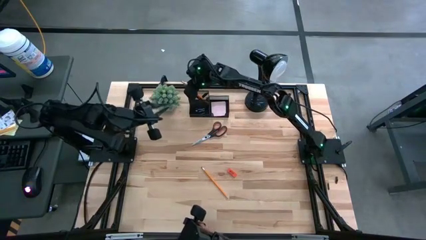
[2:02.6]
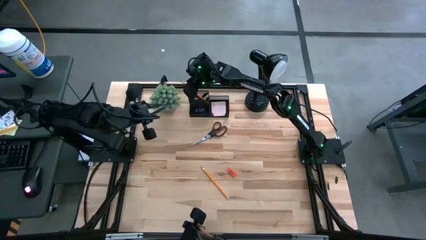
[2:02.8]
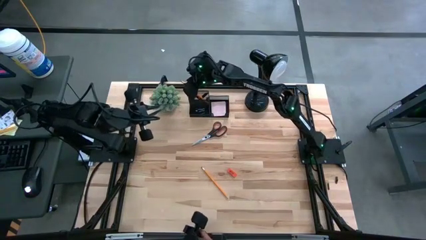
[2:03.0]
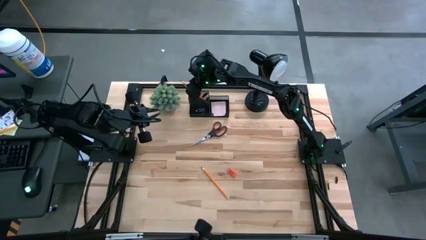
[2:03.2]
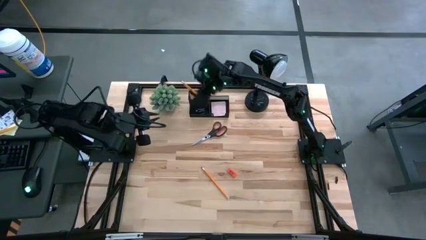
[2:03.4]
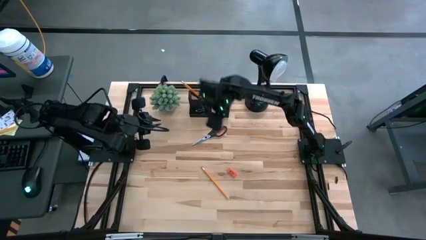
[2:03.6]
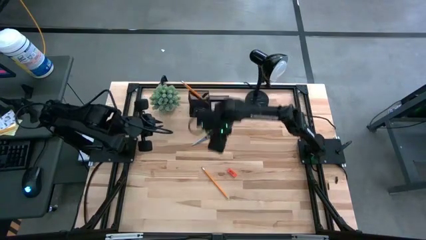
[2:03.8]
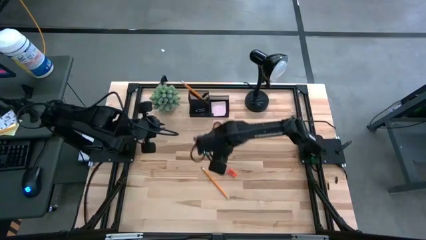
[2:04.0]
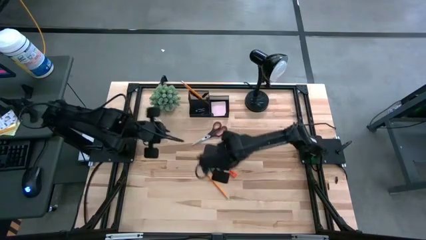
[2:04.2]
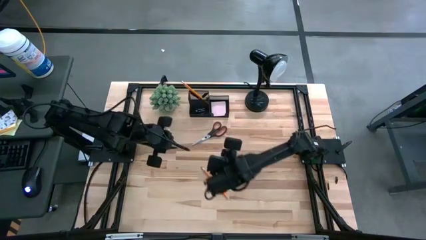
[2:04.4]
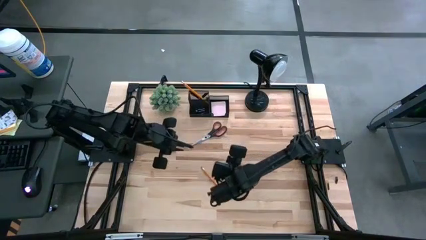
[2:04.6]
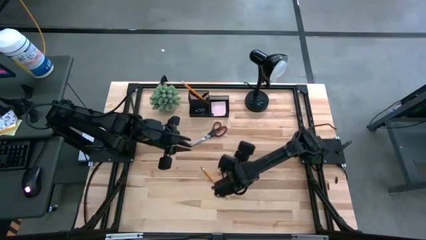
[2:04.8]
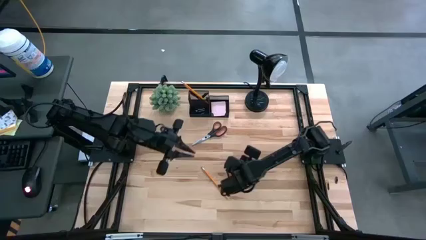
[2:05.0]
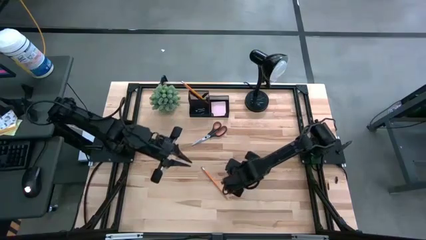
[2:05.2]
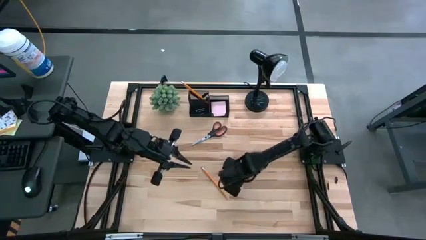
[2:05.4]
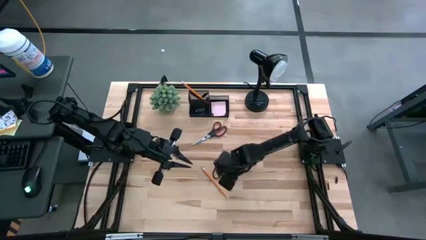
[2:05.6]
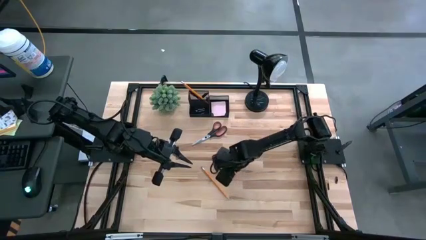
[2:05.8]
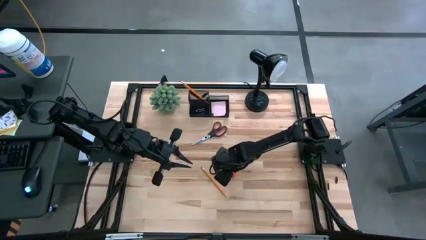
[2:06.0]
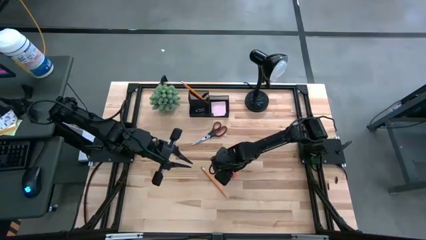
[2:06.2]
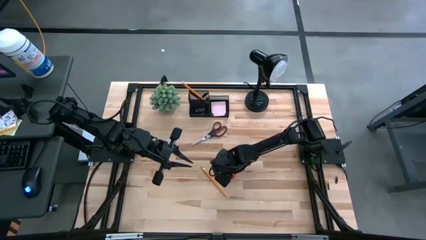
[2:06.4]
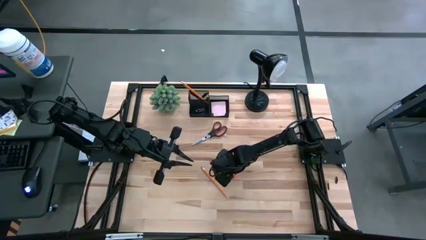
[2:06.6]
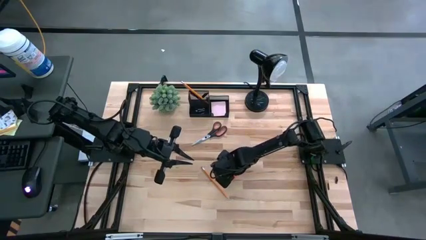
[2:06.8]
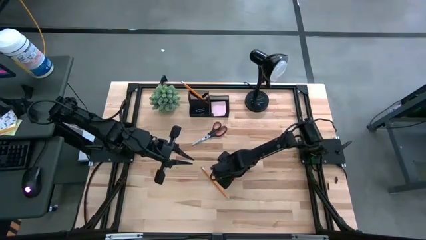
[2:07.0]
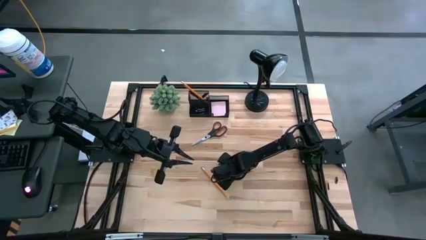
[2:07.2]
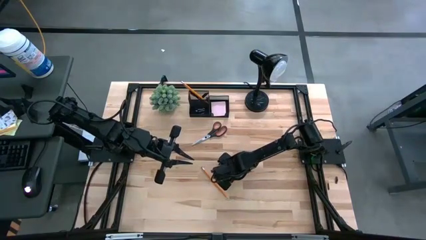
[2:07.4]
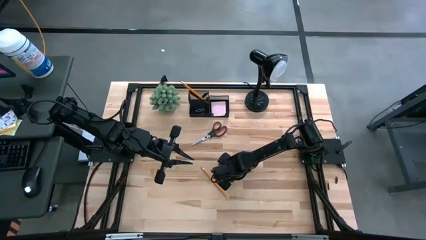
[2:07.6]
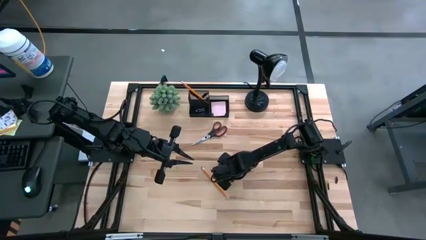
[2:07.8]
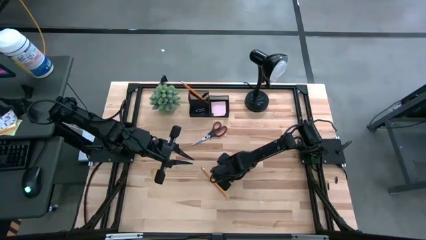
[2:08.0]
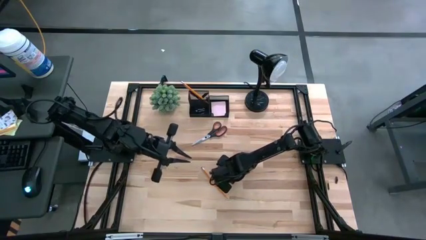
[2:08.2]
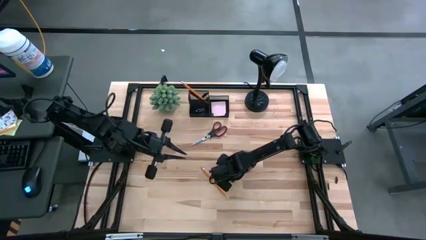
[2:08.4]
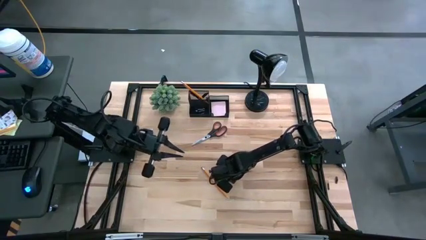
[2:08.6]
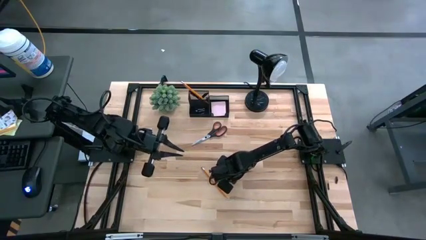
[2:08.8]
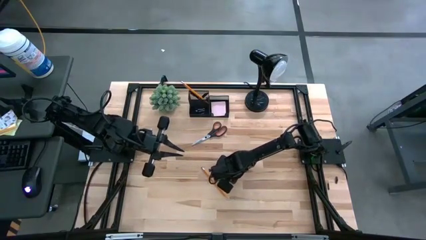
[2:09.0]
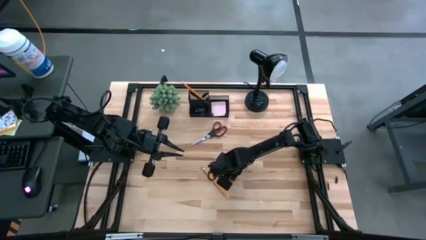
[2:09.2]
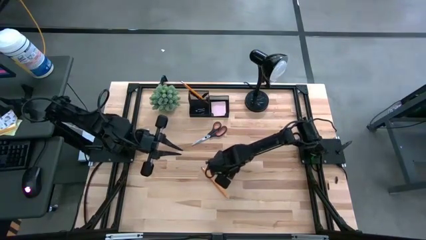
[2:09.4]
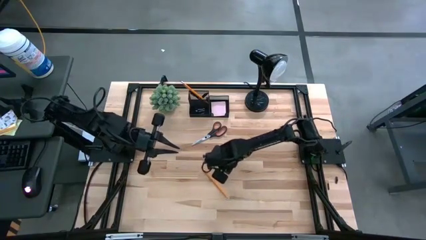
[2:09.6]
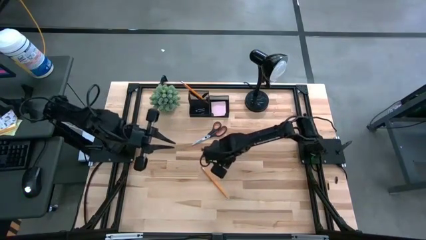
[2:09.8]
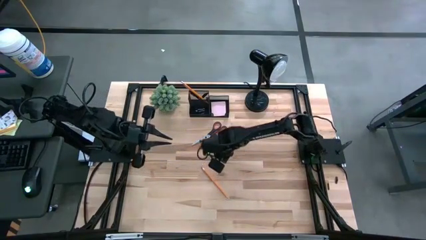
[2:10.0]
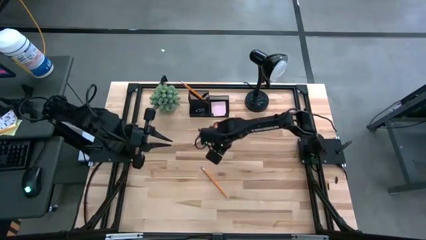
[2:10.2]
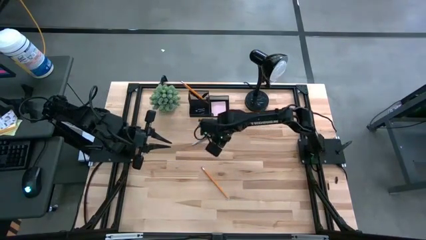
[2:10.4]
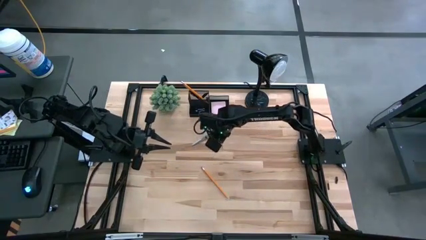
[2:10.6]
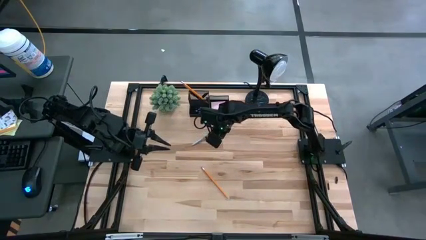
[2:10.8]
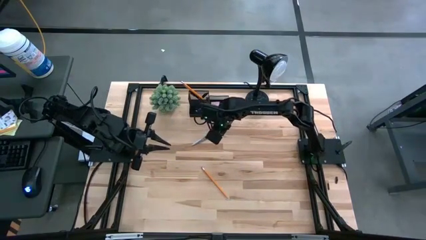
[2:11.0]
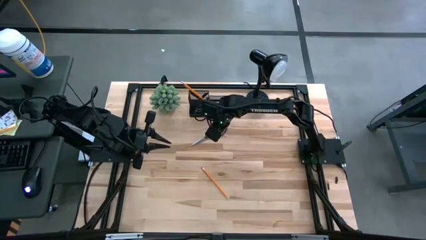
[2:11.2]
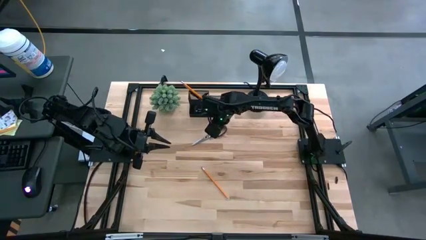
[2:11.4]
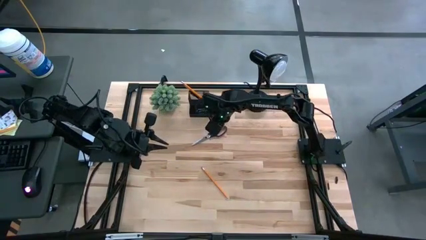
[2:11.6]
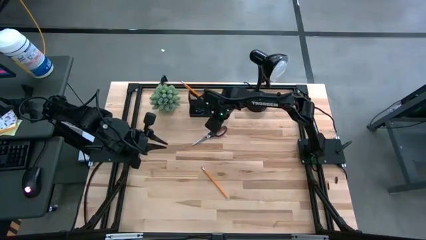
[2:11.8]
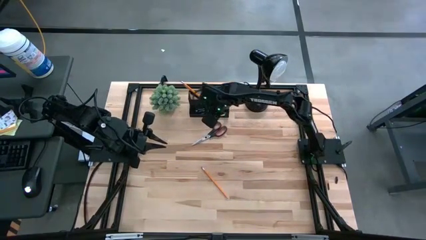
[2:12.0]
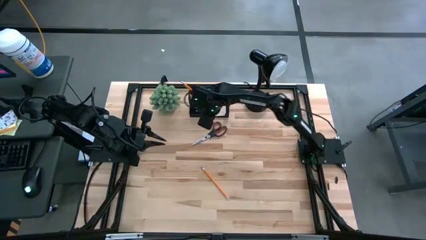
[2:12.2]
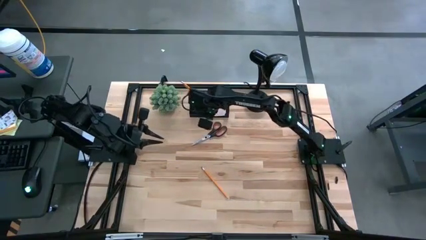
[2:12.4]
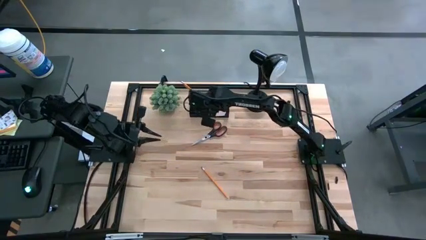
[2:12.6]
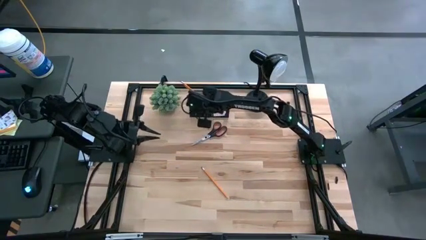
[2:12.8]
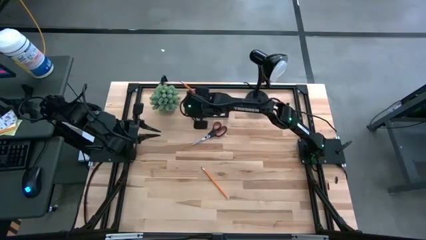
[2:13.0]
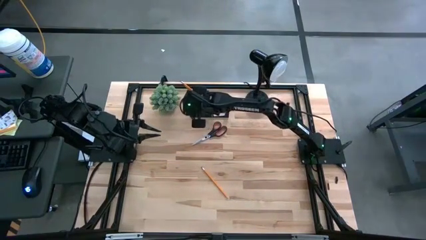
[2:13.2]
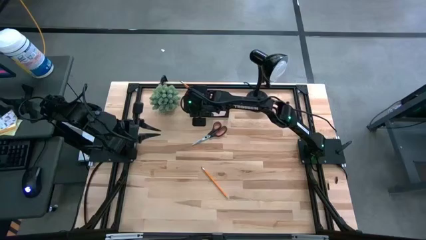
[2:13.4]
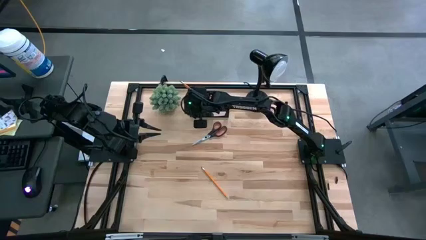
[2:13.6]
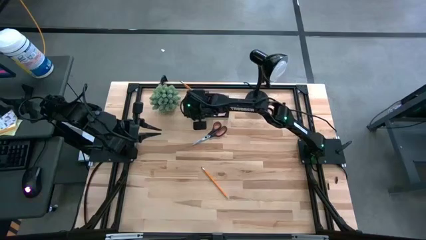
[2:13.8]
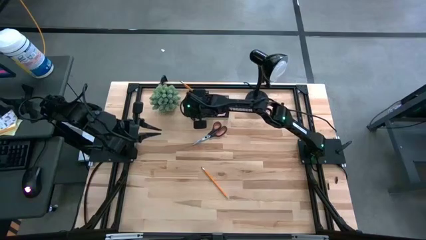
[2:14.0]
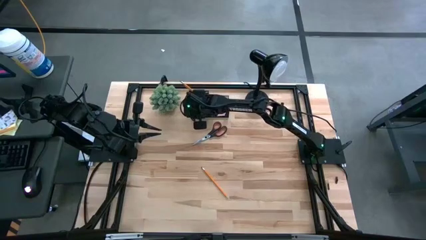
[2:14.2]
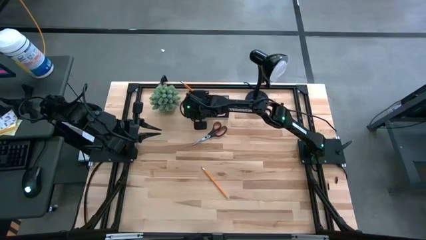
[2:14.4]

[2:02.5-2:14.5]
Task: Pick and place office supplies into organizer
Put the orange eraser into the black desk organizer

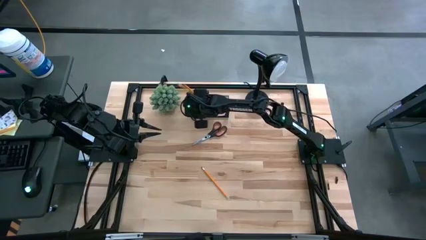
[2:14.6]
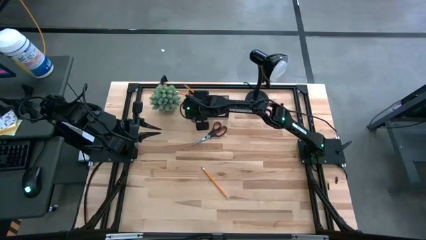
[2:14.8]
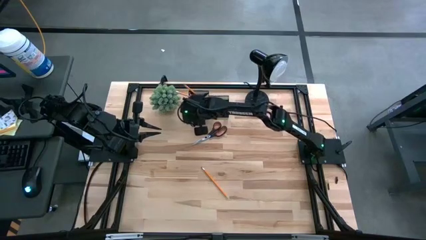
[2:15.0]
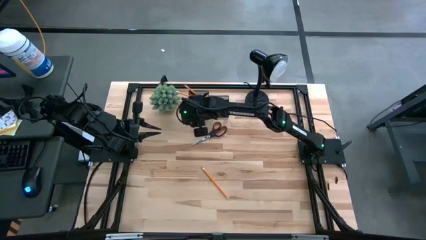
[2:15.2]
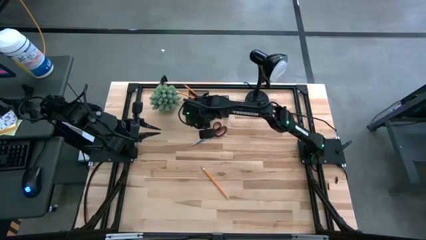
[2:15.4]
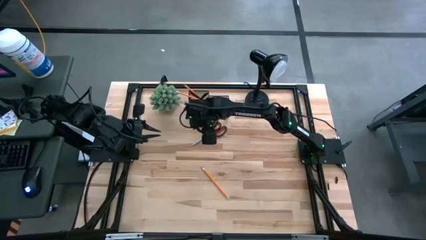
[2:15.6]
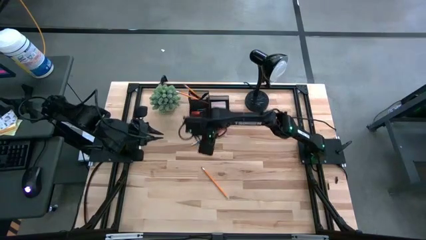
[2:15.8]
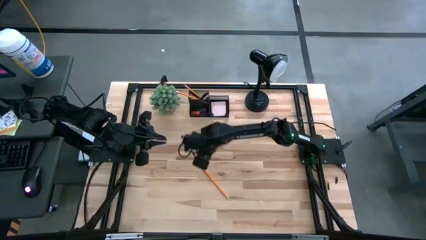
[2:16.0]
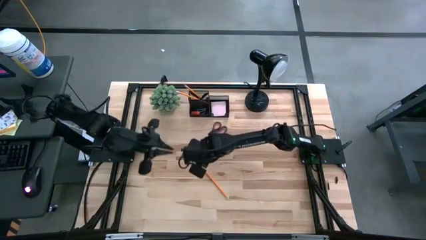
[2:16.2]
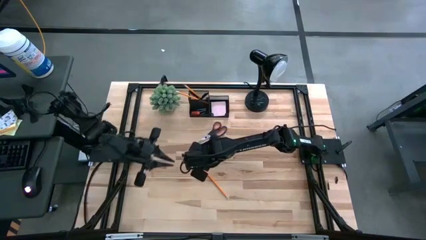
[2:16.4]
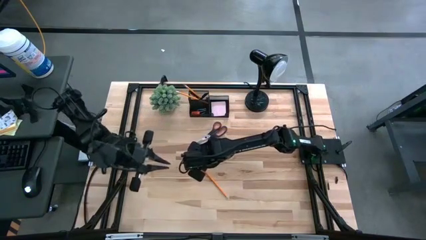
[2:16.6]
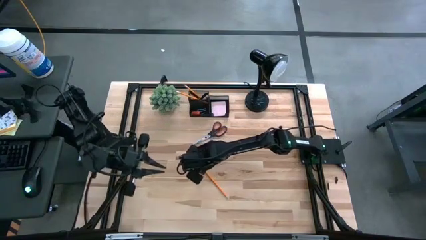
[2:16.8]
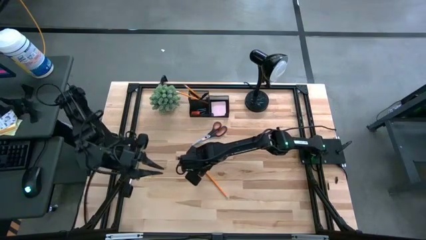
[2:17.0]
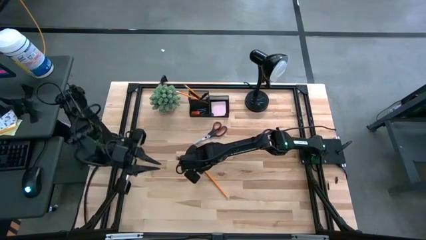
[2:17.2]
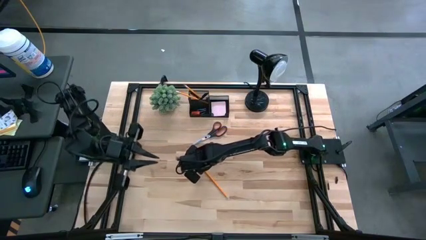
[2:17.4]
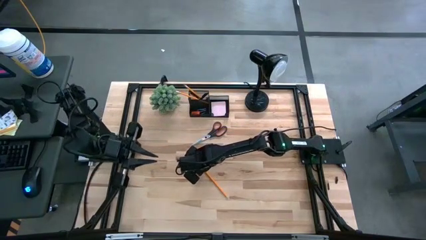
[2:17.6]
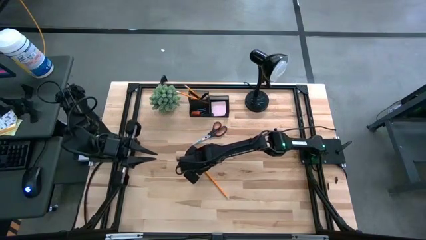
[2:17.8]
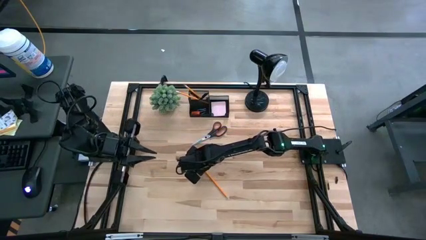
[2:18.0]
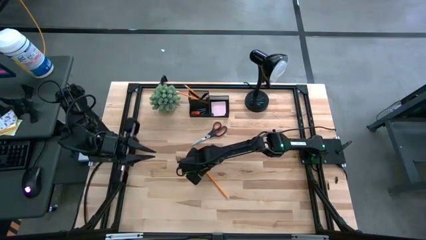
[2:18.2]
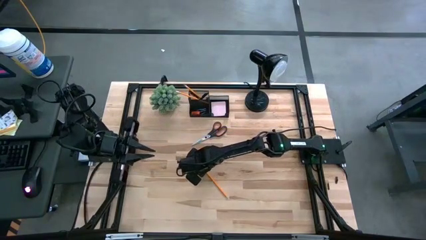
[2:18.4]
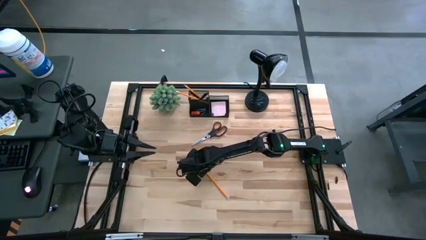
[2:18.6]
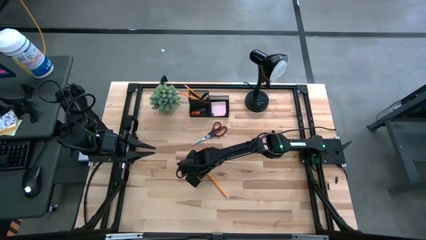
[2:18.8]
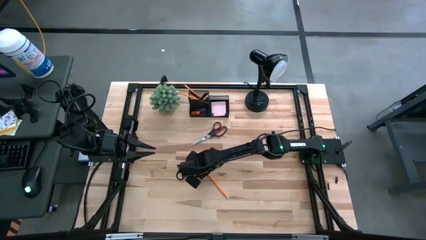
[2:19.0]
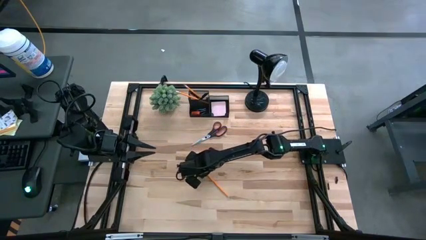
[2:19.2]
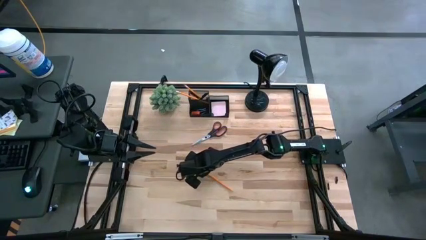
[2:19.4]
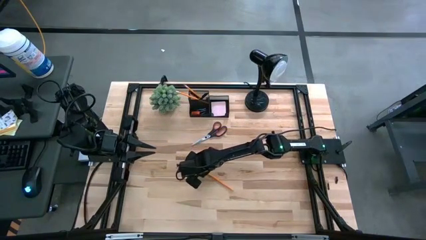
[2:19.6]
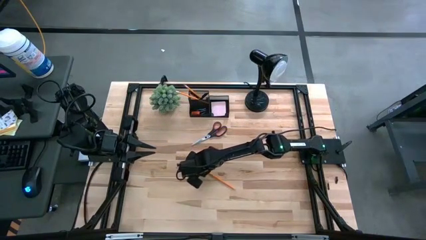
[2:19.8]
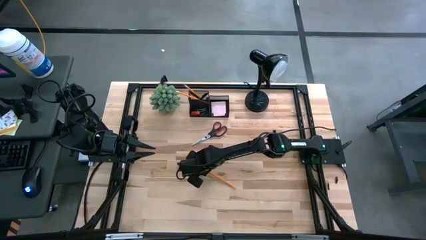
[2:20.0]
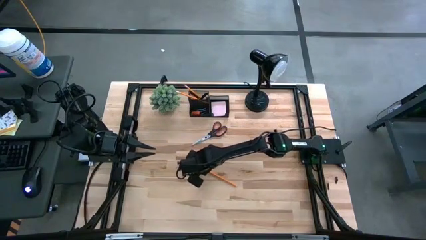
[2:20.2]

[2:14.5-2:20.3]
Put the pencil into the black desk organizer
